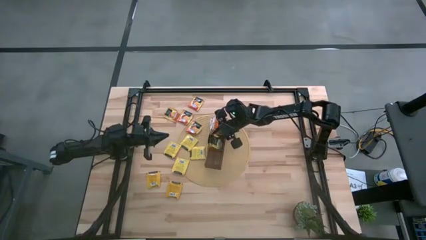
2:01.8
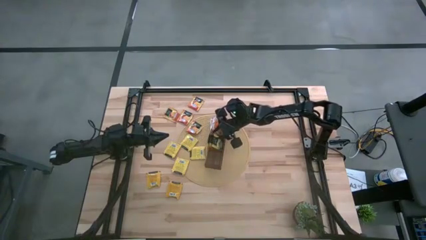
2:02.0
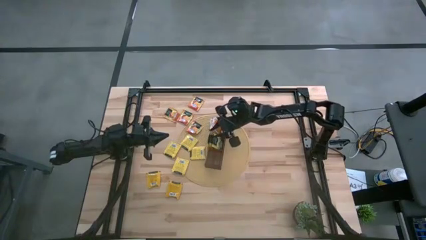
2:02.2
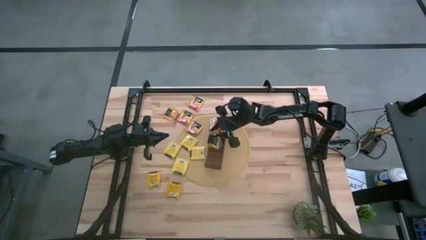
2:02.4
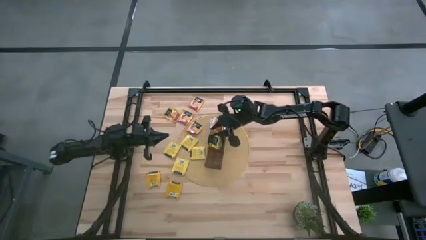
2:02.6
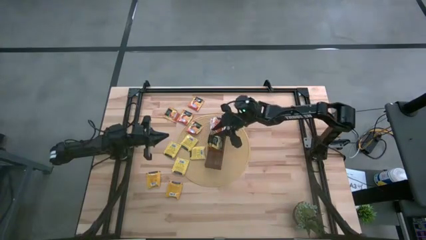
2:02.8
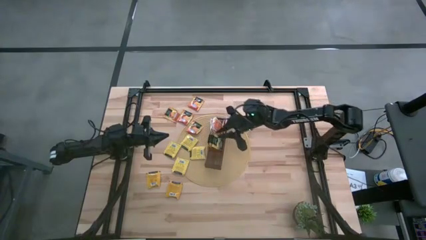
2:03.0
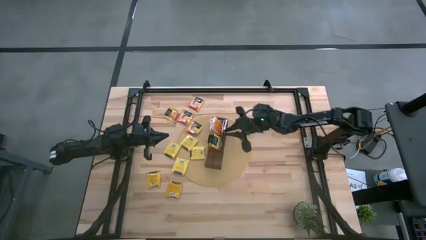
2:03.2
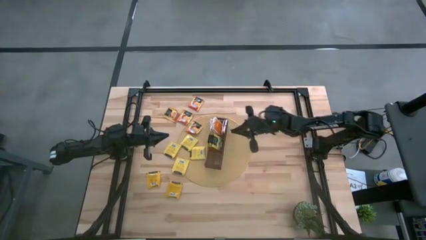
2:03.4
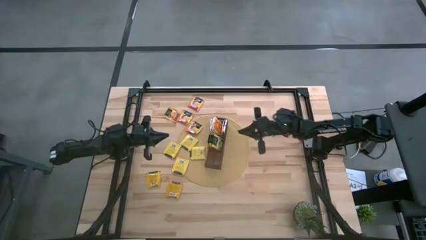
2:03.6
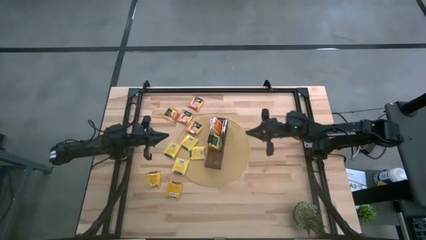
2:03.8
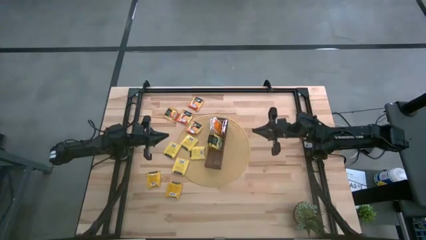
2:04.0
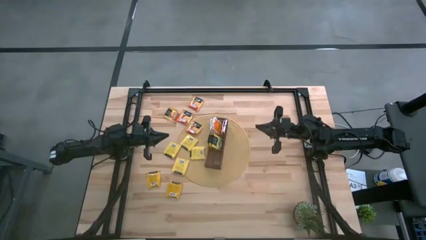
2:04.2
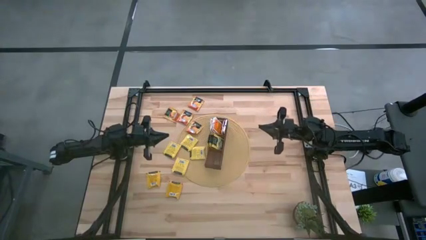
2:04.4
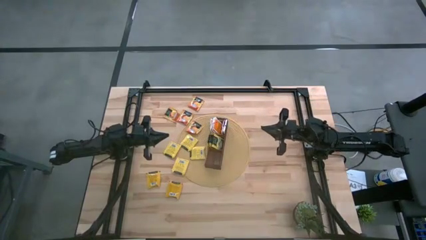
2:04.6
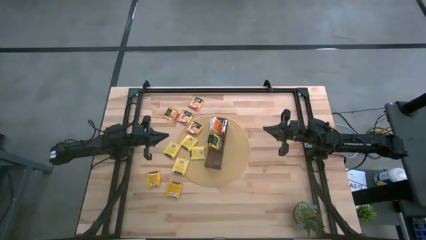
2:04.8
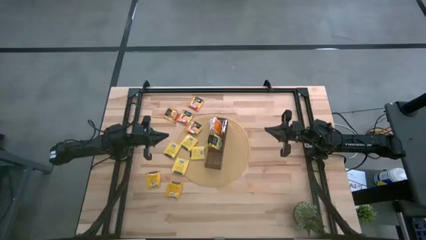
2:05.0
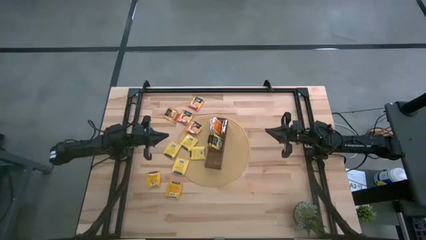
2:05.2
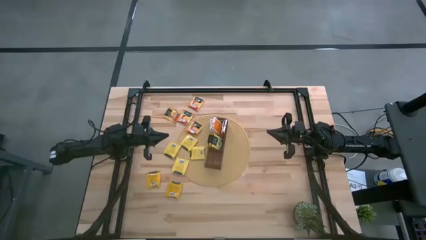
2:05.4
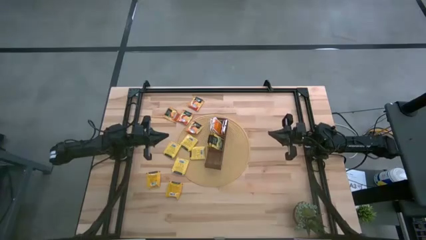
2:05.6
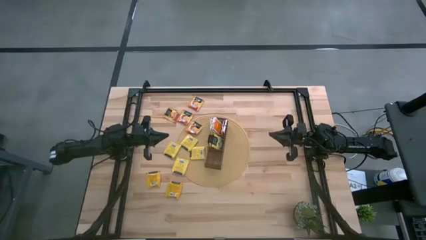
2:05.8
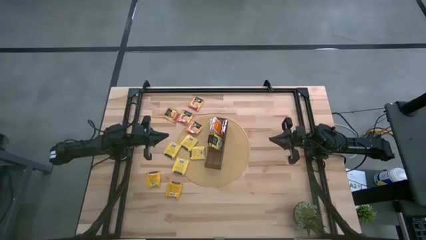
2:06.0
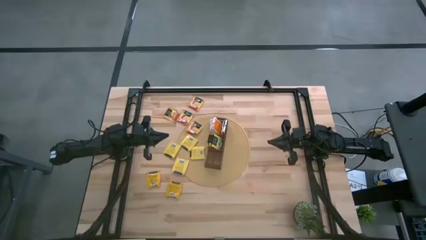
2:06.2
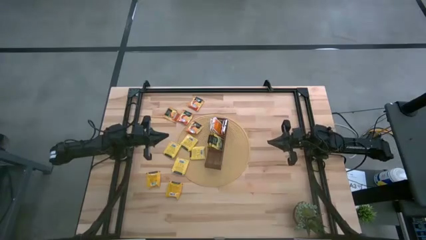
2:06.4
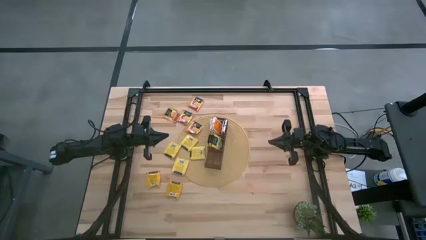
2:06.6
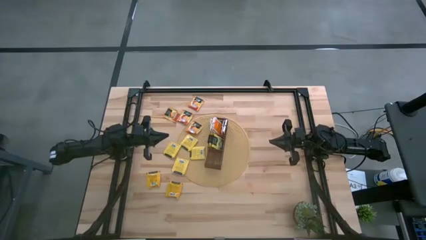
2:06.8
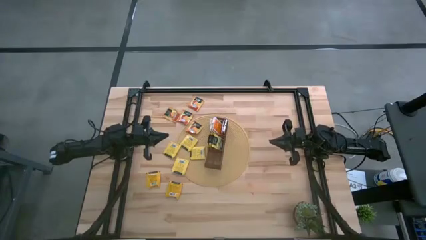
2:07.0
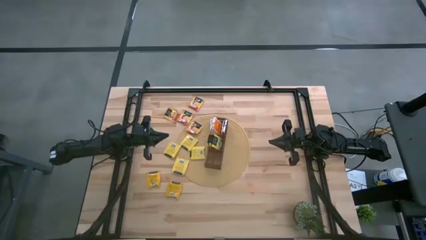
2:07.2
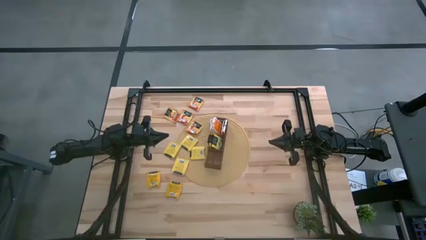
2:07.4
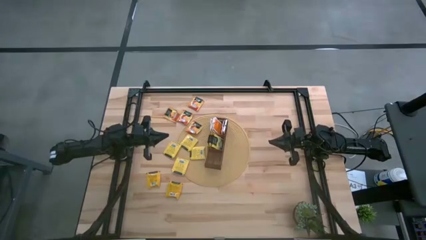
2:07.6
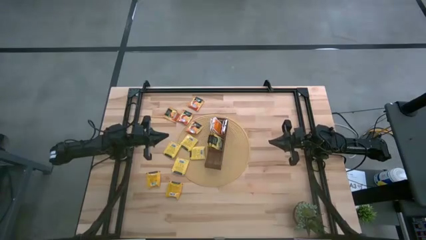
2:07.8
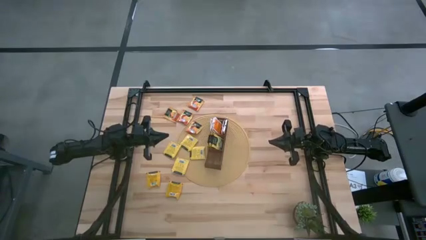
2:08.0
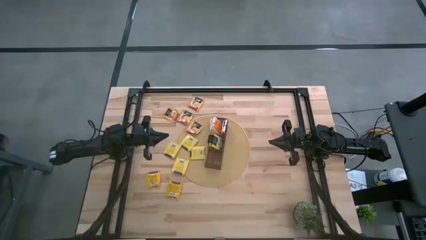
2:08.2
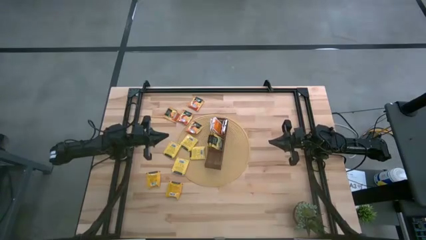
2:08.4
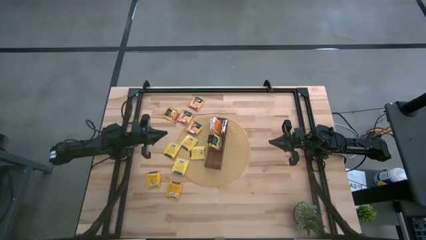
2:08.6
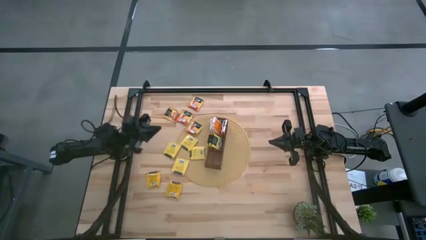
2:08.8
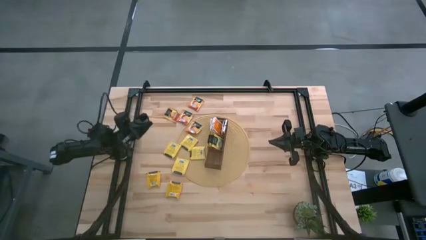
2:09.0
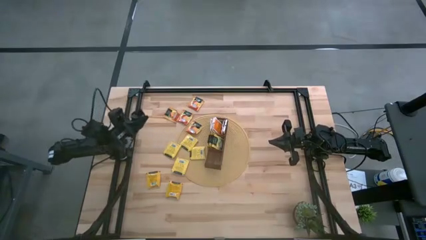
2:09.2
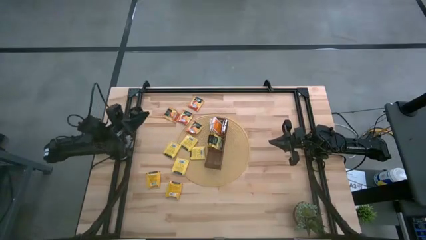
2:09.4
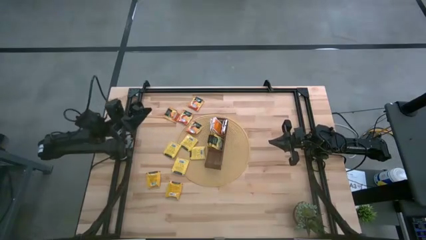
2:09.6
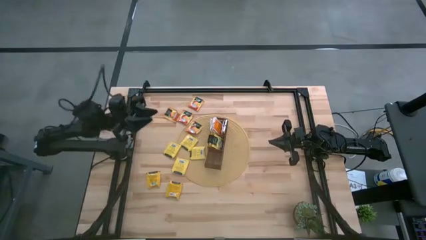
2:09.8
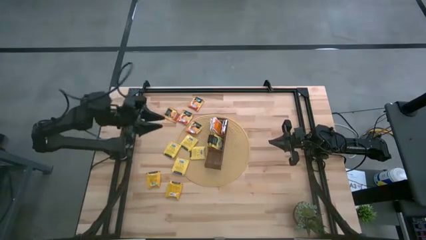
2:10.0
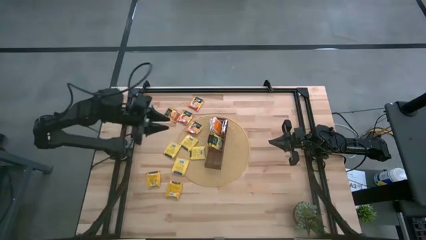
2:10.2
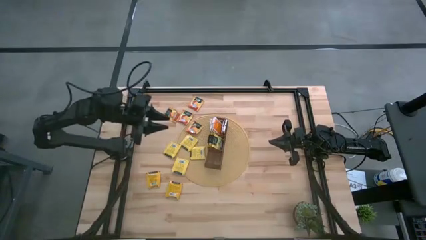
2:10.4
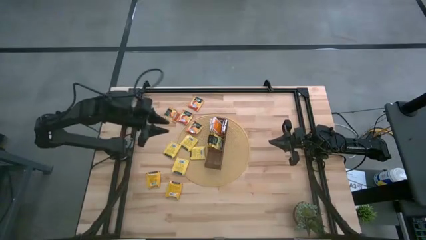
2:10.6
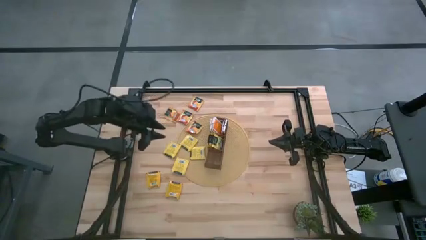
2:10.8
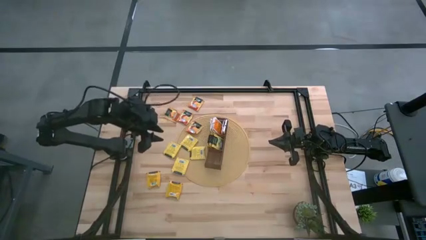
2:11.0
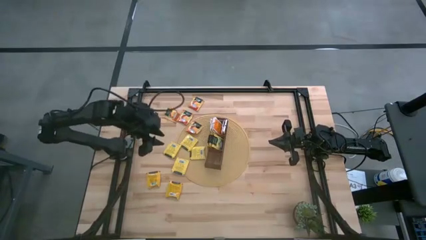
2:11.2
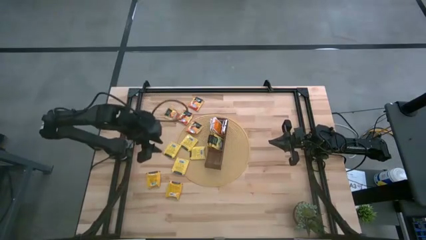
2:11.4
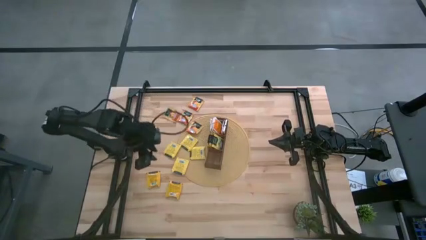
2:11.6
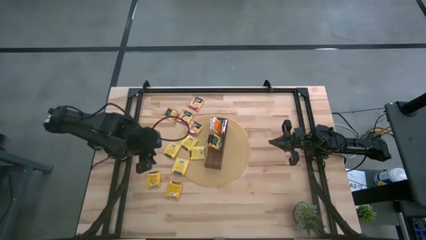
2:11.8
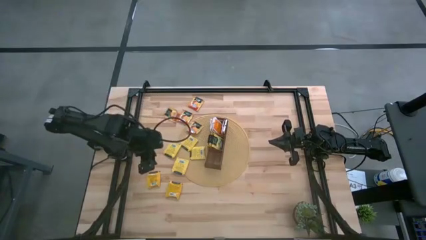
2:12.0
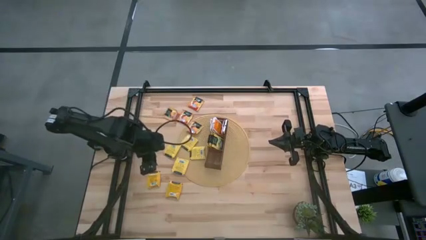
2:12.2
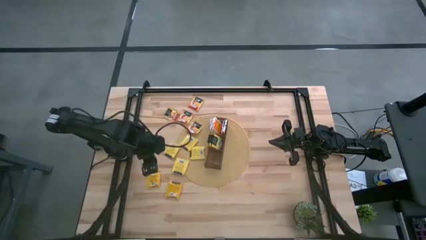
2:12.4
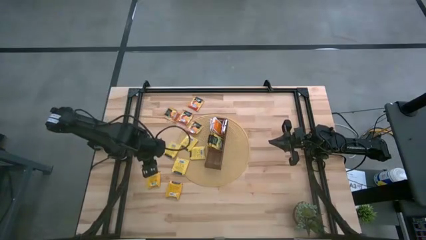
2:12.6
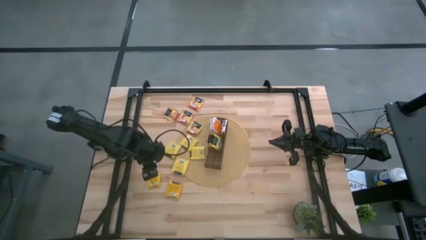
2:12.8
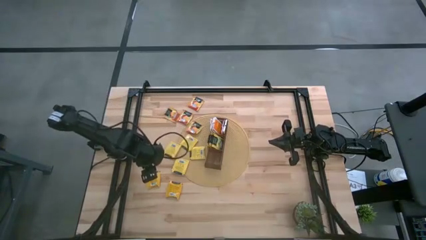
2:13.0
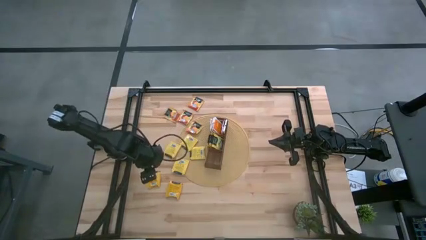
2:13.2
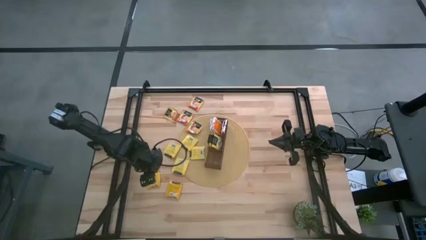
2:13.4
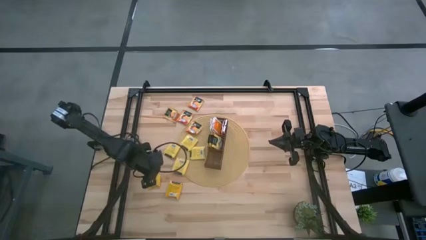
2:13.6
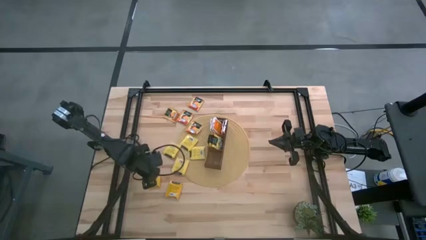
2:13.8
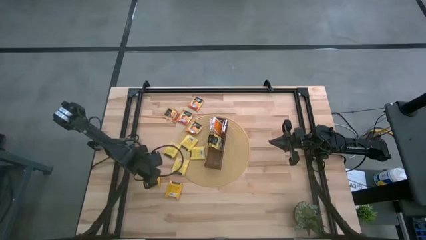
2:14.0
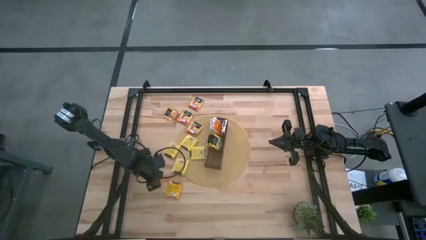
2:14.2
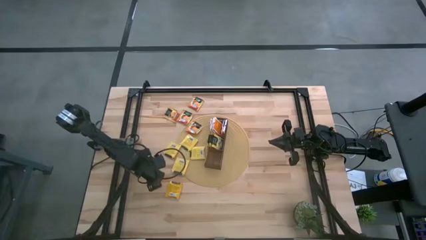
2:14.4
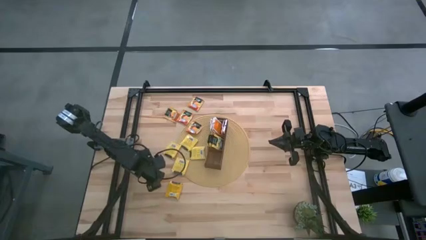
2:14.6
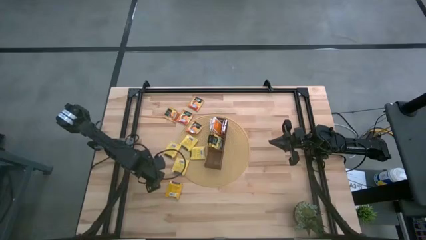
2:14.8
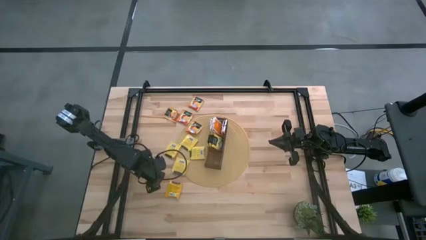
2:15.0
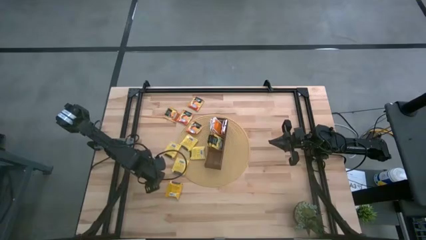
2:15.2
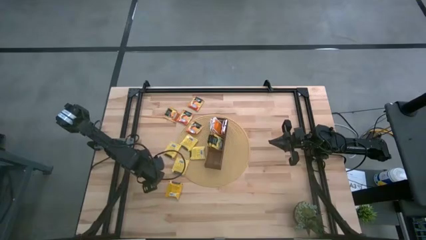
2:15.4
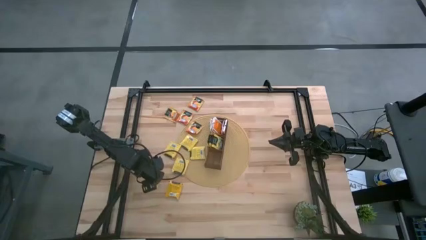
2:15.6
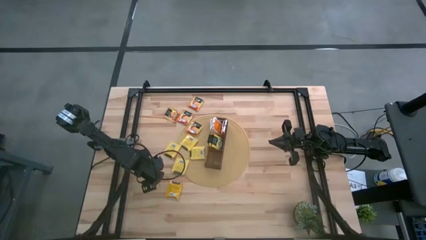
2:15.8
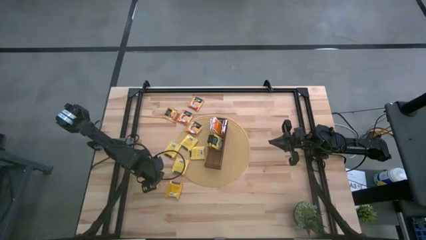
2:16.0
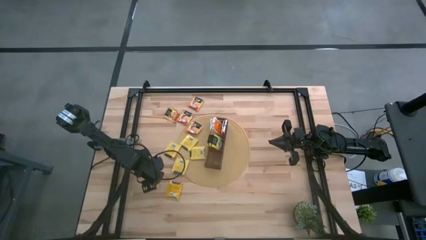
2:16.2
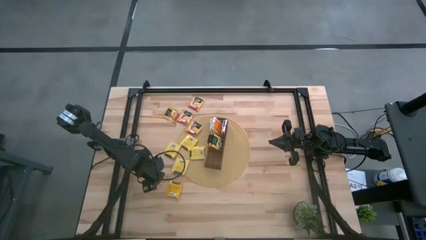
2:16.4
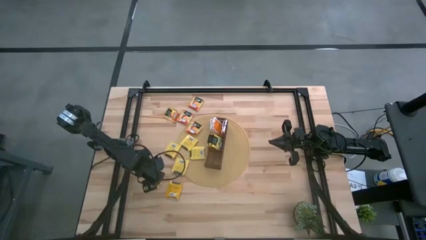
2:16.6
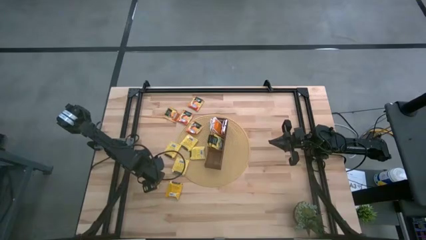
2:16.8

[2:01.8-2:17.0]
Task: Pick & Place Tea
Put the orange tea bag into the bottom section of the wooden organizer

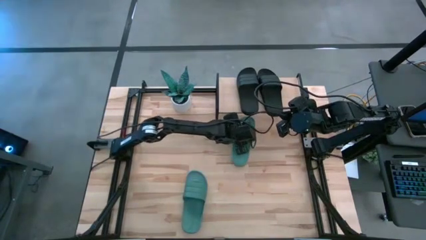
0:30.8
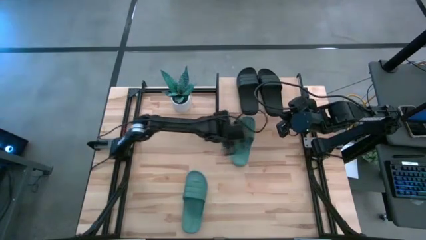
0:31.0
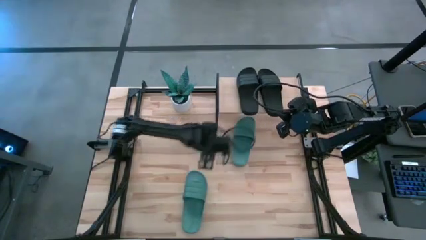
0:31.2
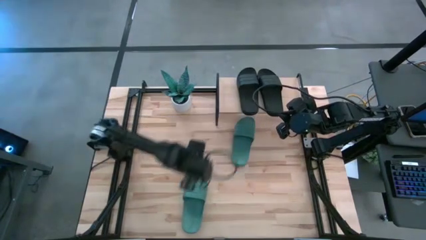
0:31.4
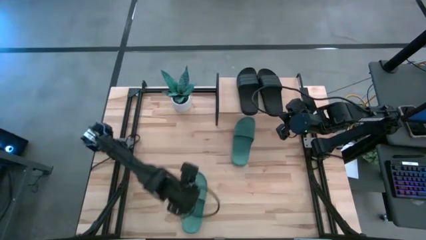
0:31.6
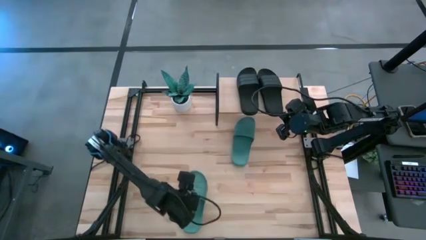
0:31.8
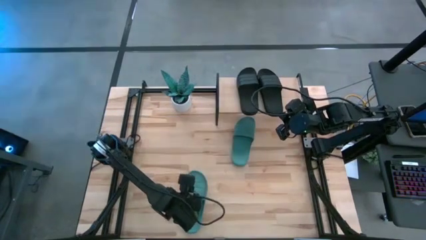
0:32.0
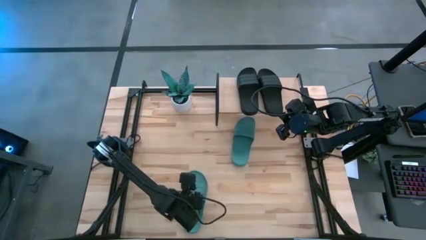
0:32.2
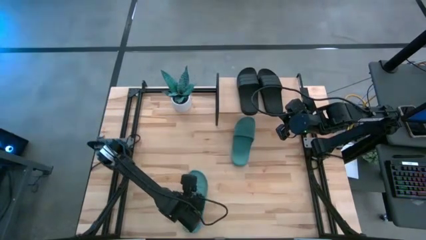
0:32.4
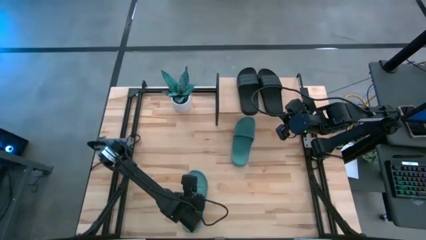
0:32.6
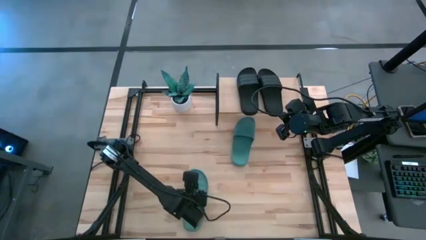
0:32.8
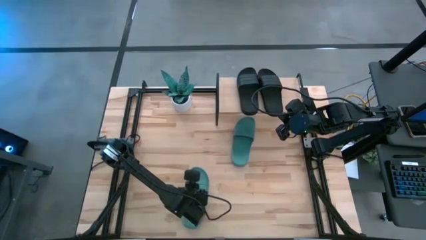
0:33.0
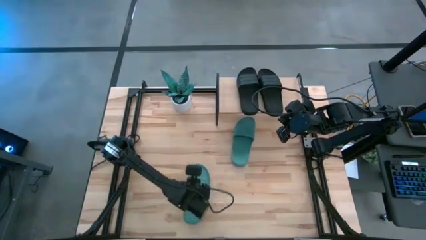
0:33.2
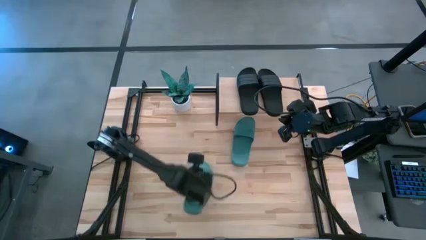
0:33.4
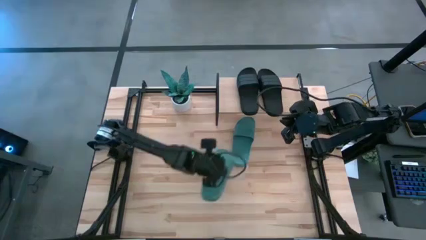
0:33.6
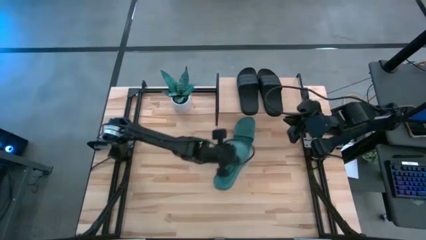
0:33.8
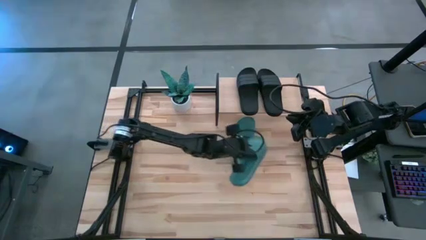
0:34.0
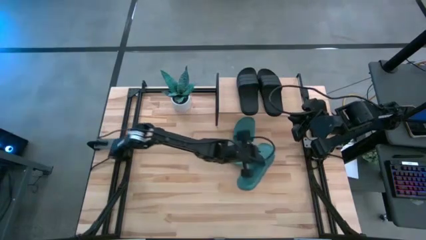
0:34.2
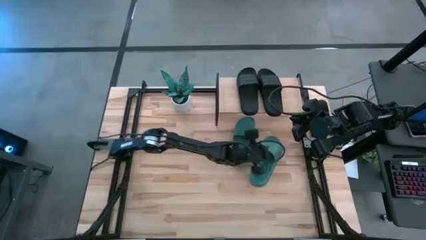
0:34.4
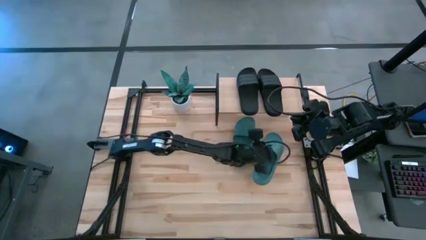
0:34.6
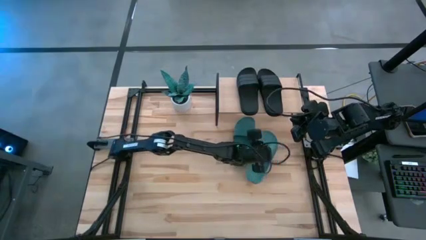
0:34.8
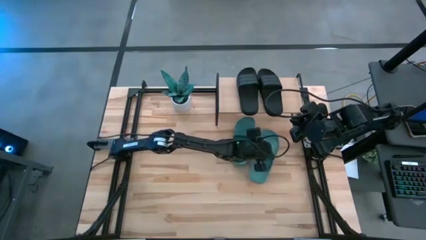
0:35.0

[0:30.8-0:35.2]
Task: Pick and place slides into the shelf
Move the bottom green slipper to the middle of the table
